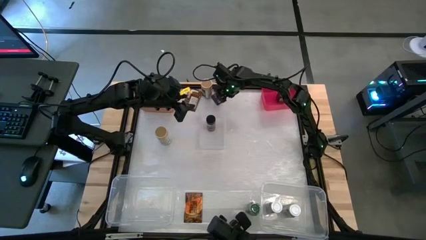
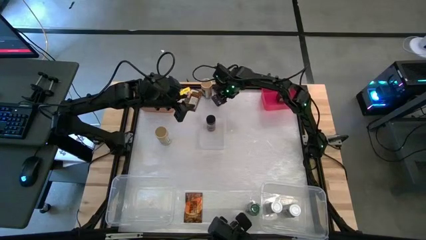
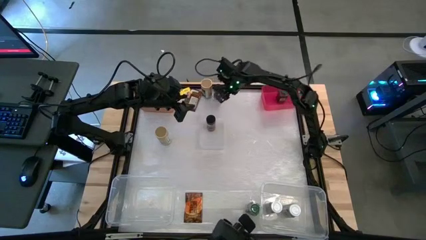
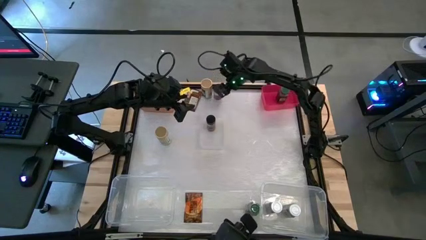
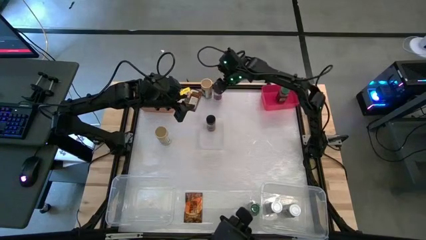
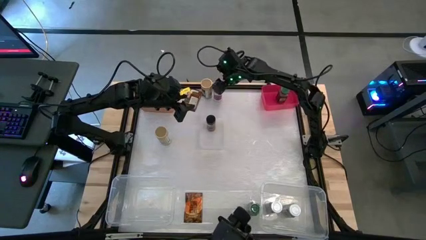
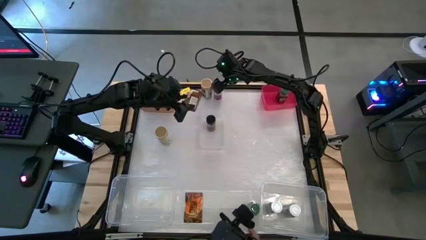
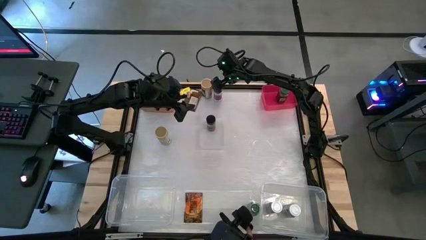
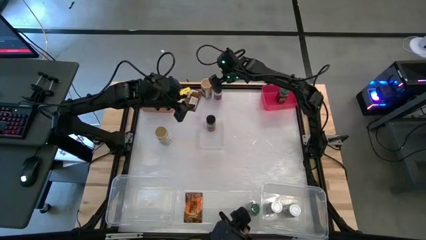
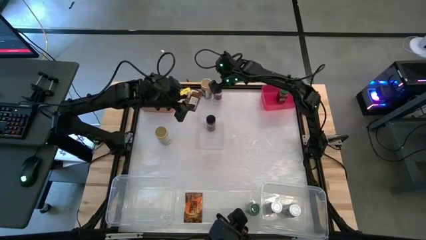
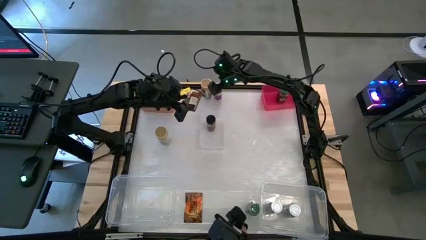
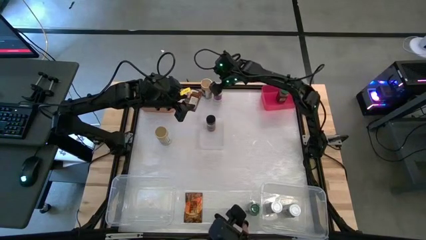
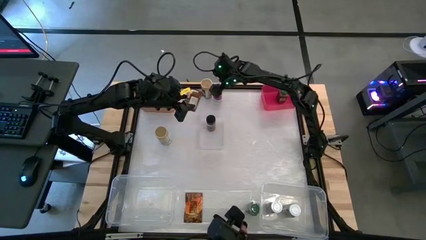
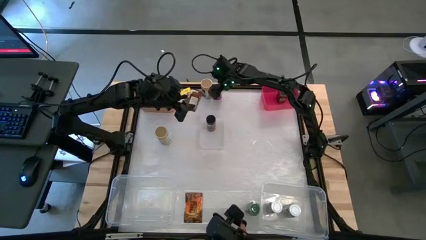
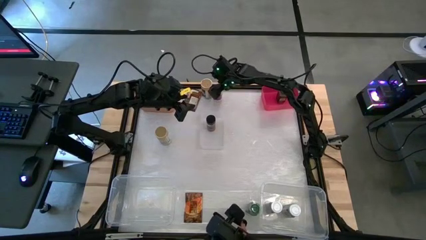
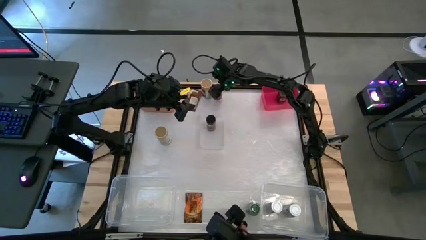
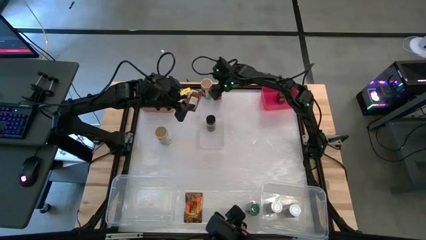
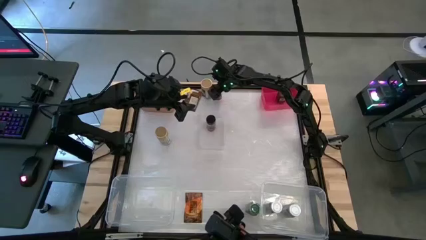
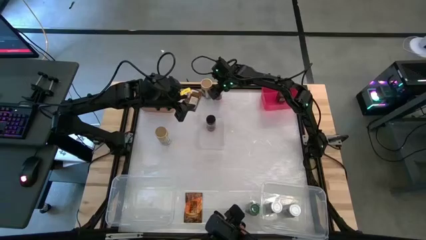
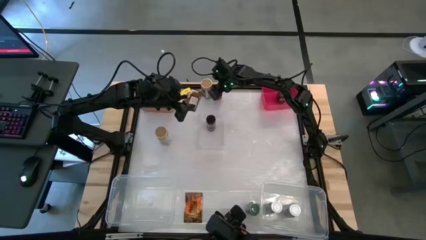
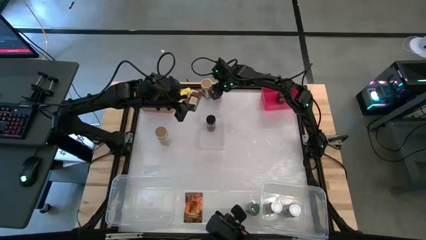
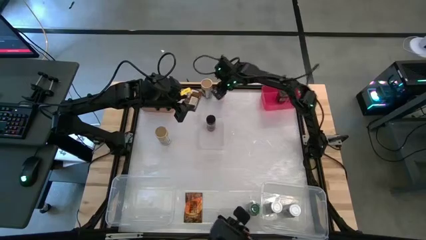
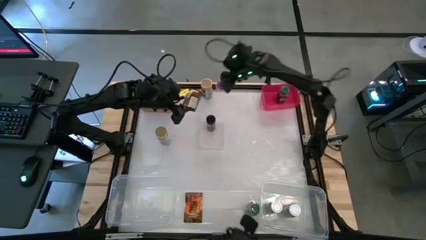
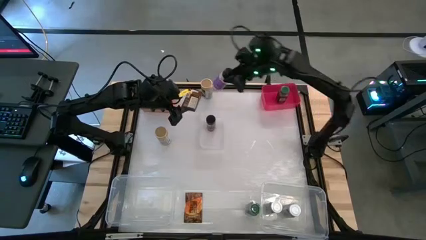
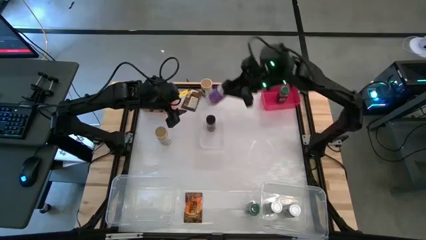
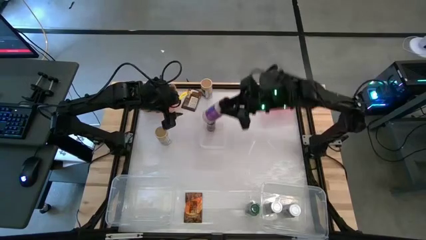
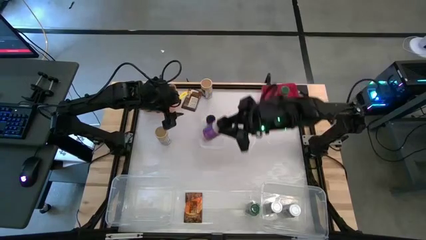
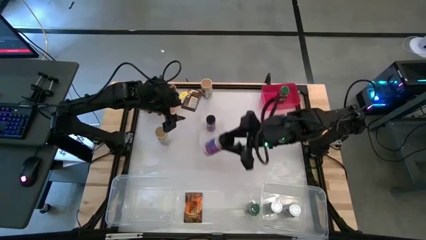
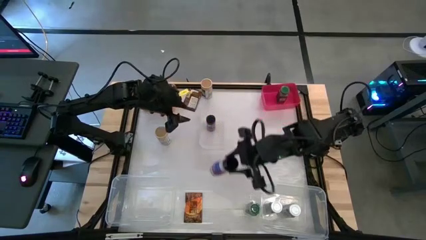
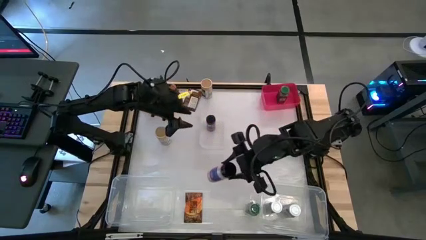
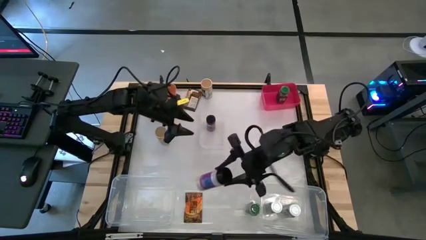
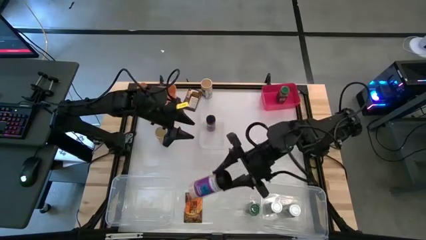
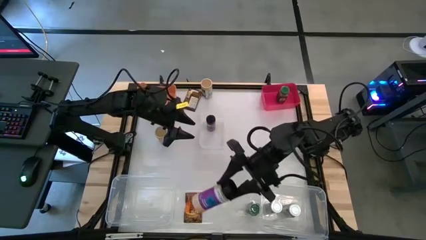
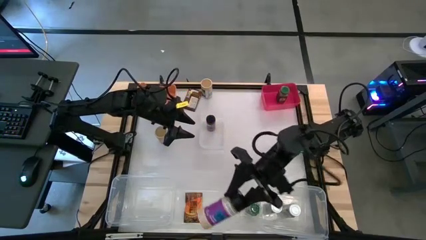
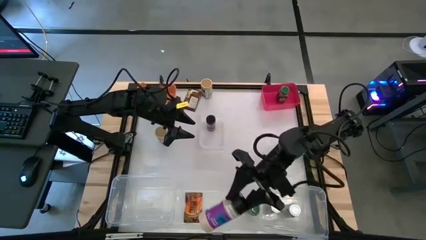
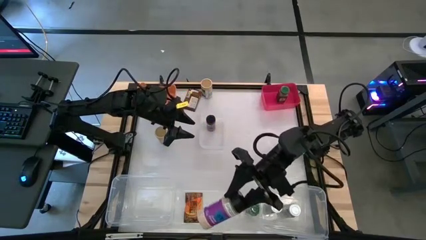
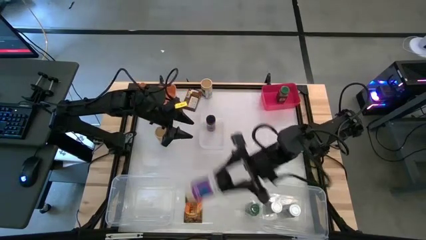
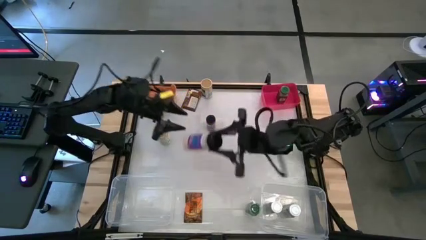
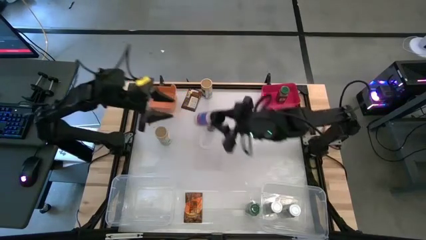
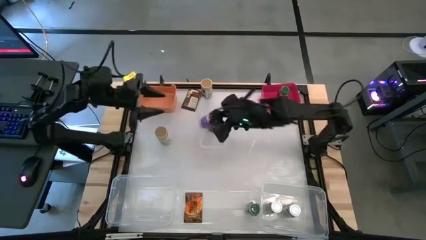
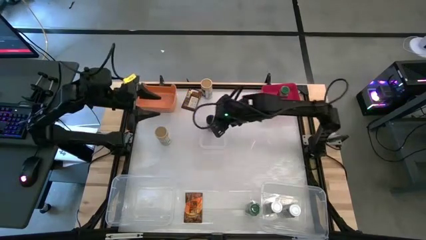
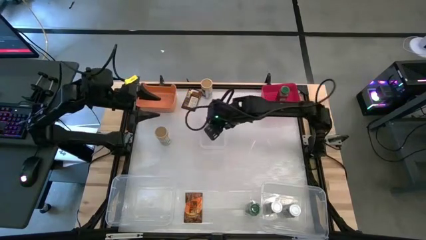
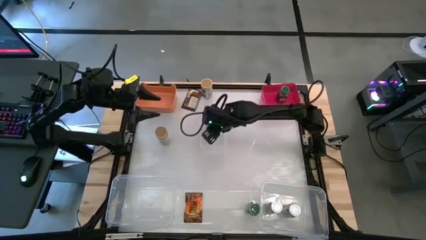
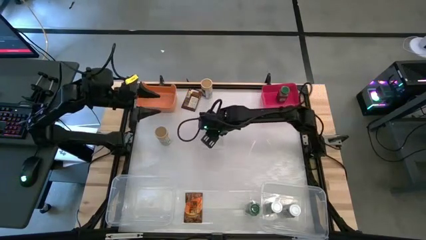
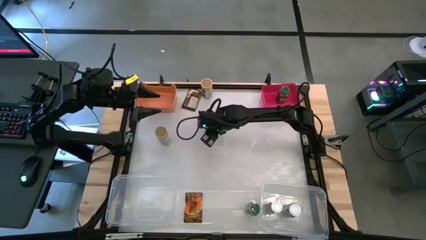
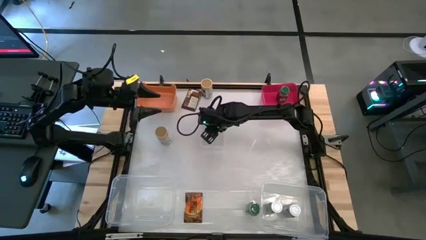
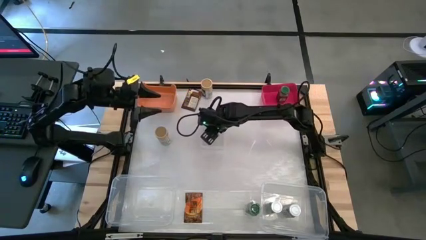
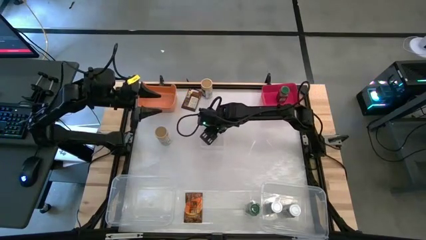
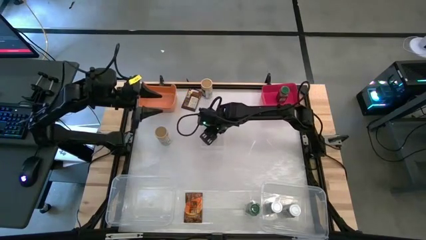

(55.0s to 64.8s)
Task: Sort spices by type
Put the black seasoning bottle into the white bin

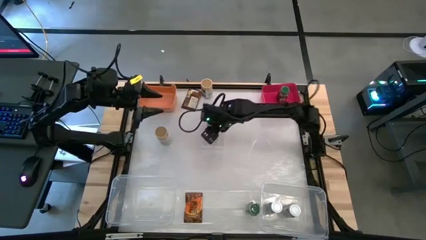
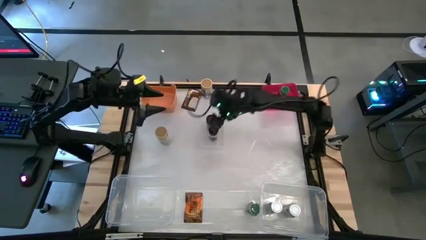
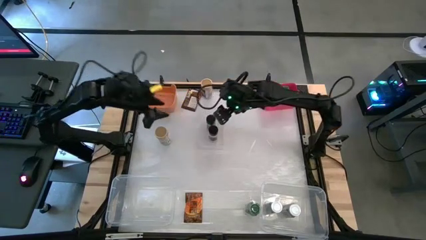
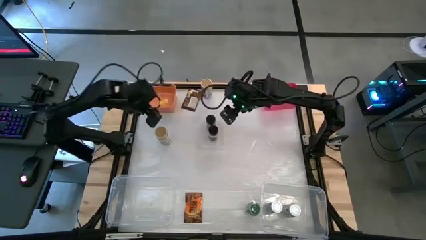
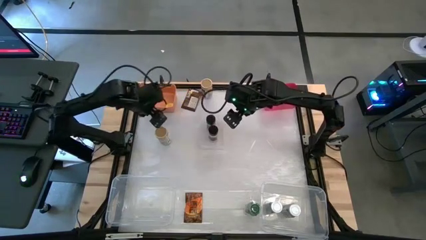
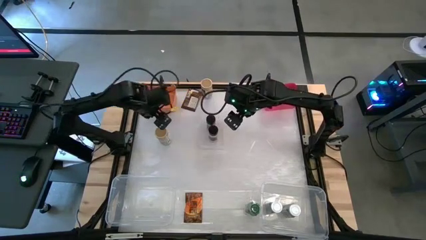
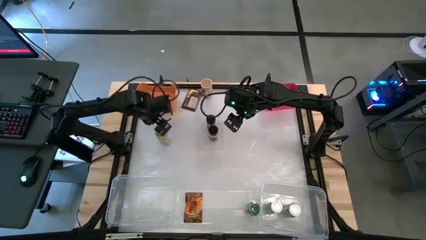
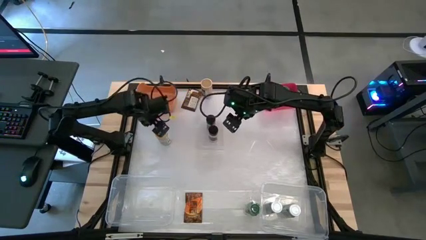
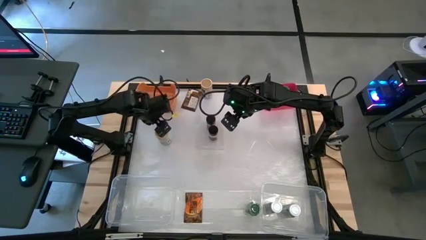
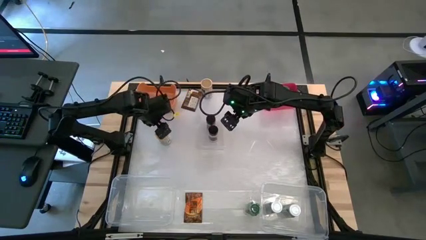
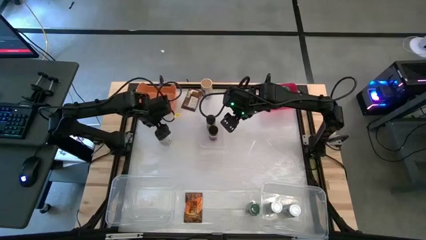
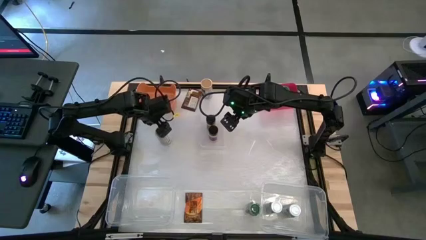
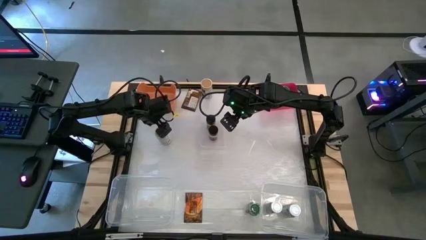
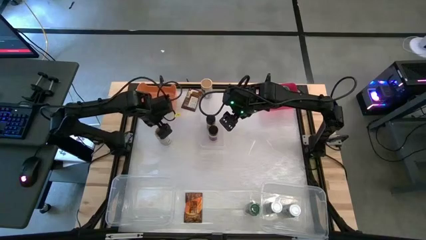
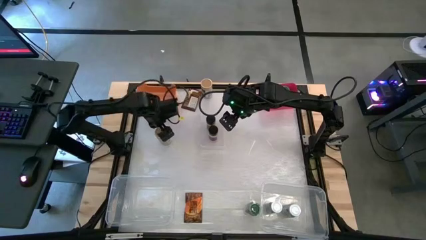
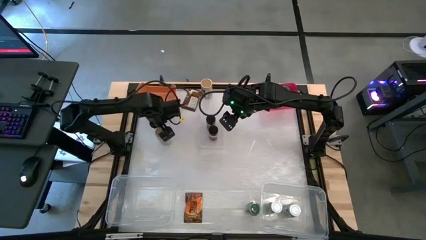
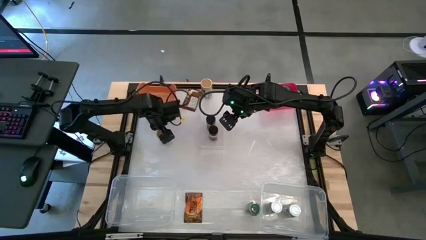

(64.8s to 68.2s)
Put the bottom gold seasoning bottle into the left transparent bin

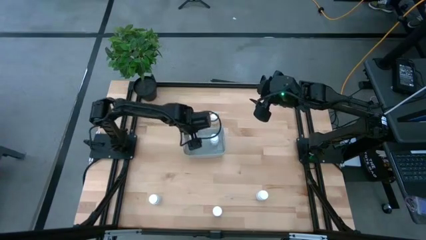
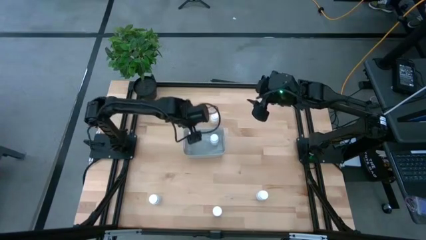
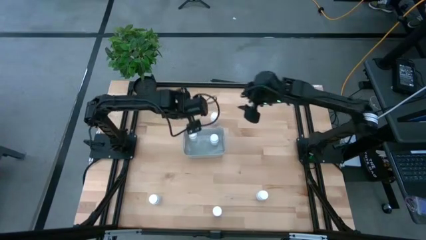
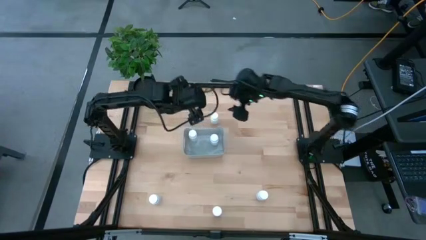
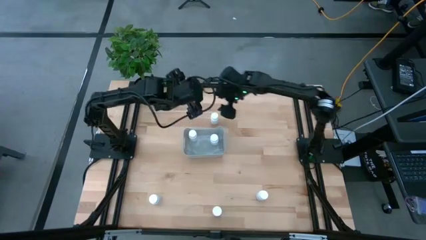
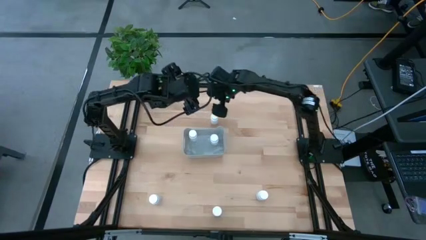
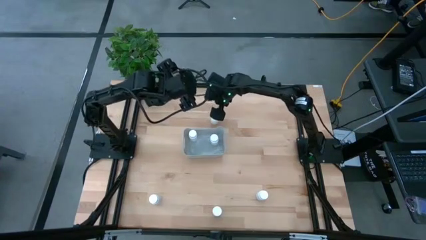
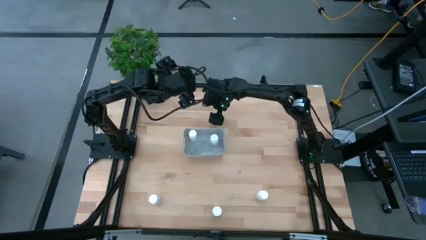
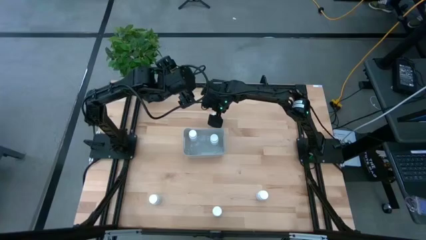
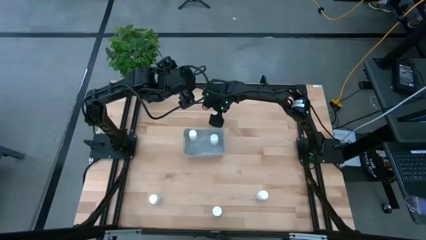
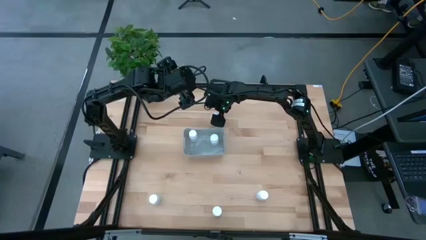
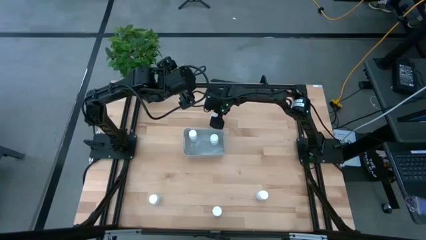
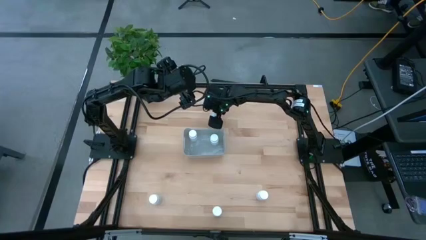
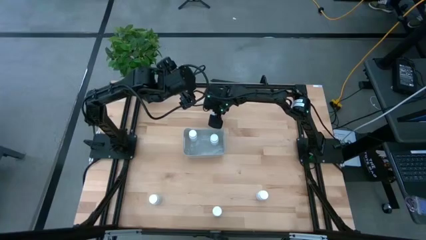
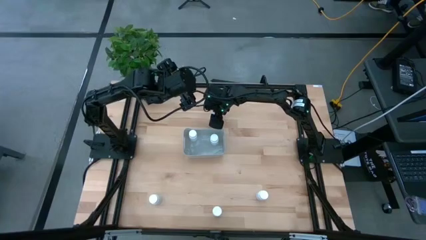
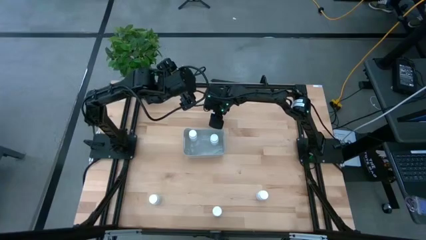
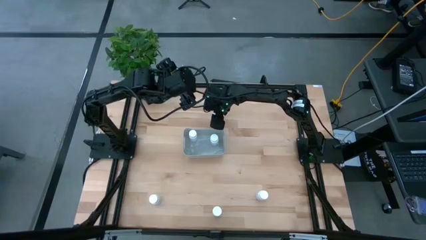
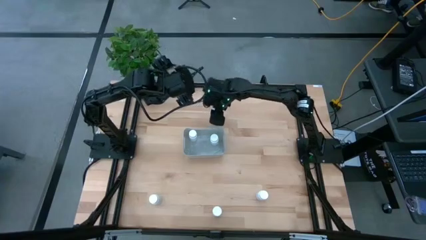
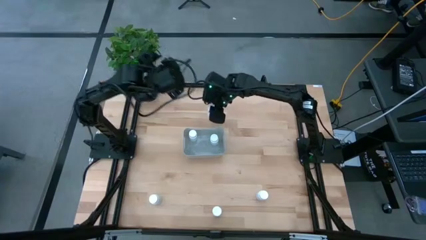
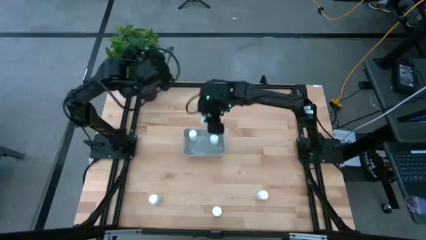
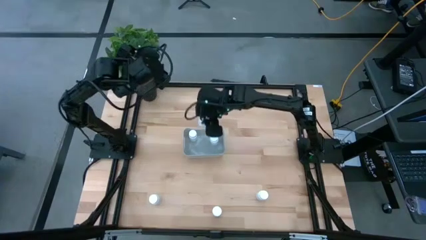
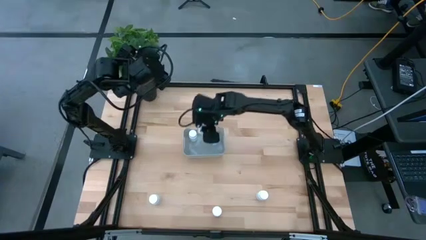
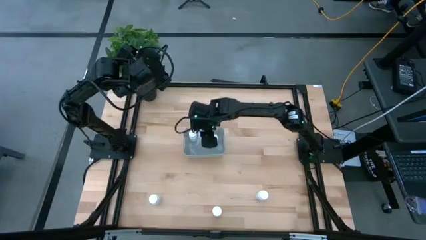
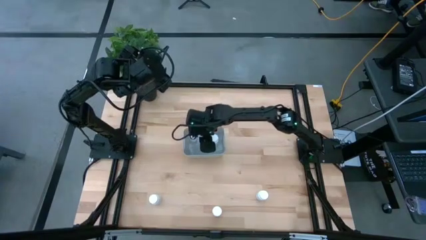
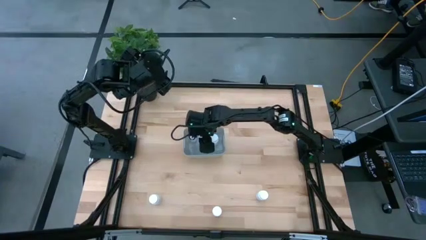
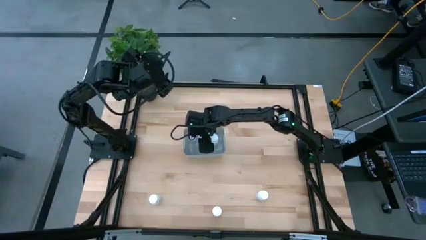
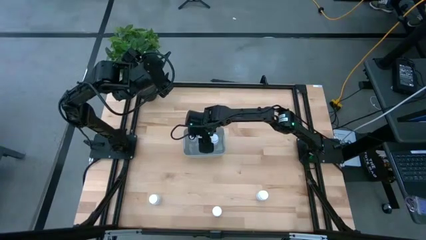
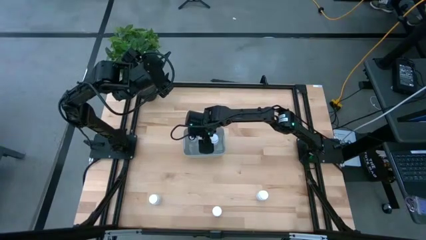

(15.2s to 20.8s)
Task: Pick and place pill bottles into a basket
Put the white pill bottle into the gray basket
